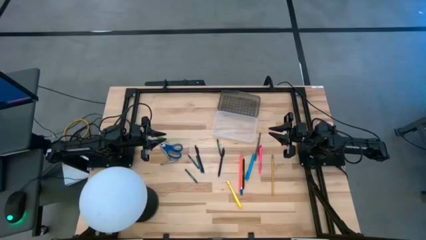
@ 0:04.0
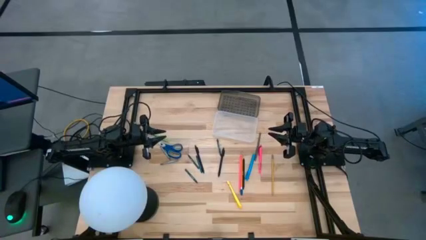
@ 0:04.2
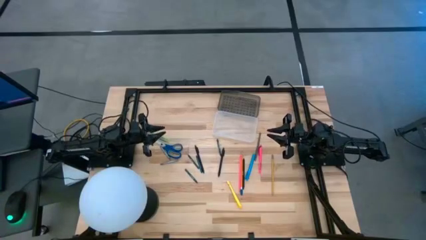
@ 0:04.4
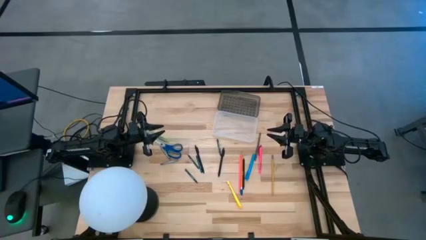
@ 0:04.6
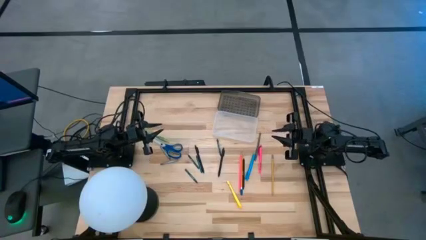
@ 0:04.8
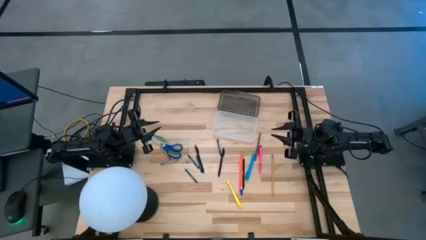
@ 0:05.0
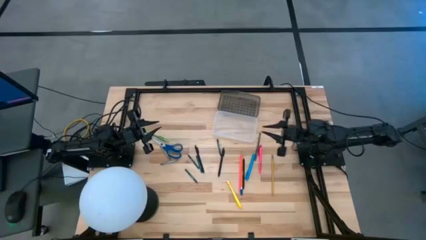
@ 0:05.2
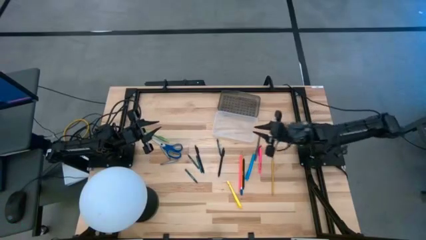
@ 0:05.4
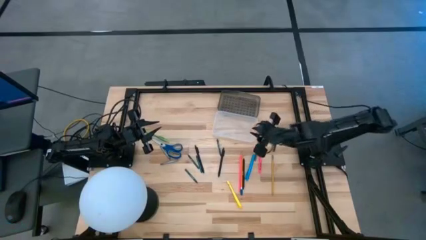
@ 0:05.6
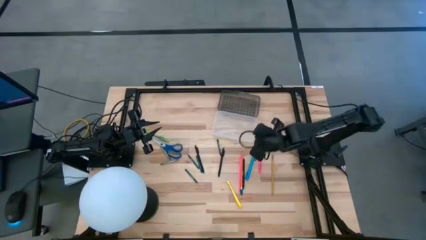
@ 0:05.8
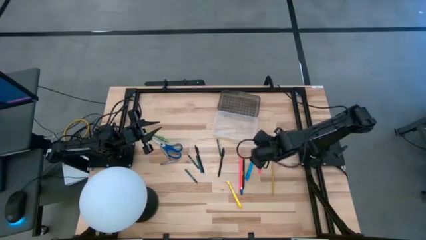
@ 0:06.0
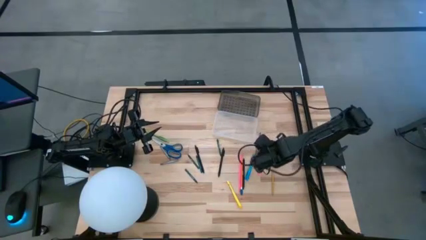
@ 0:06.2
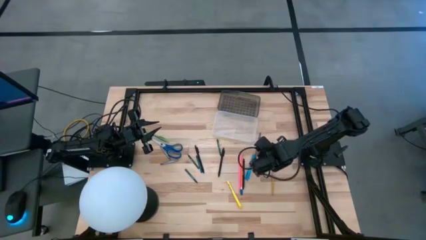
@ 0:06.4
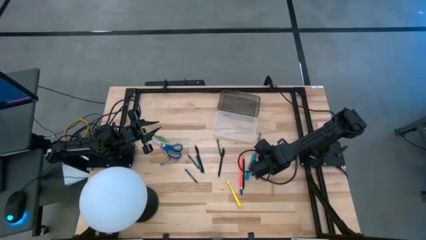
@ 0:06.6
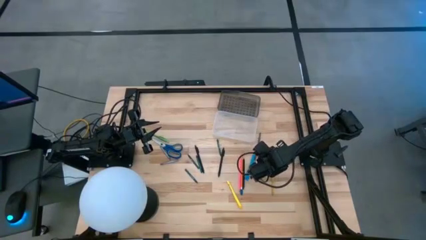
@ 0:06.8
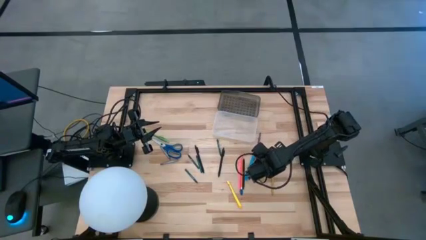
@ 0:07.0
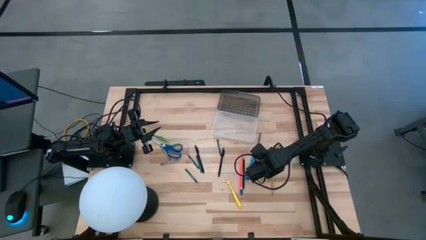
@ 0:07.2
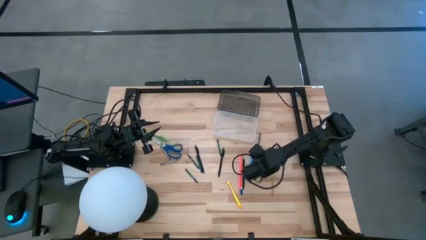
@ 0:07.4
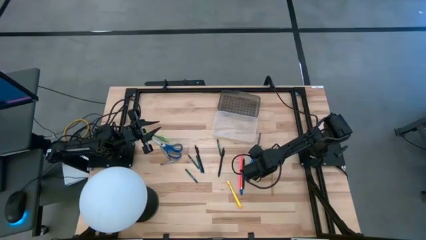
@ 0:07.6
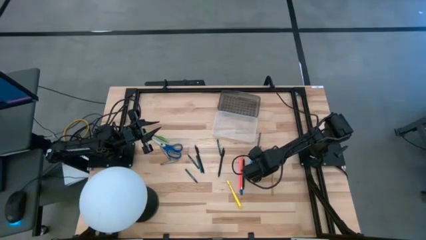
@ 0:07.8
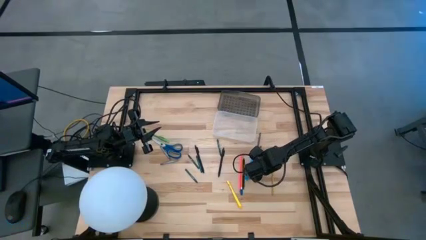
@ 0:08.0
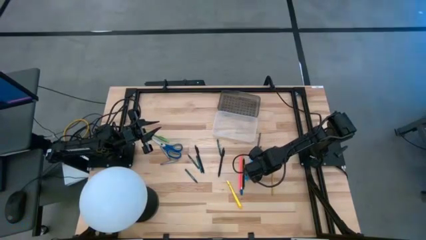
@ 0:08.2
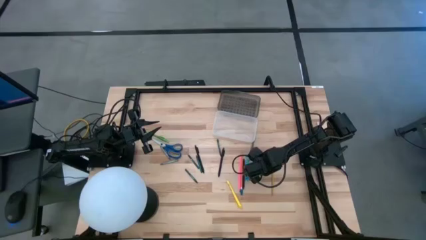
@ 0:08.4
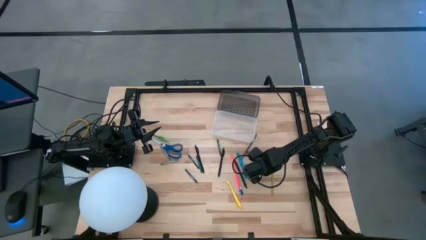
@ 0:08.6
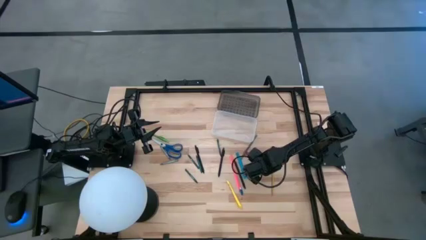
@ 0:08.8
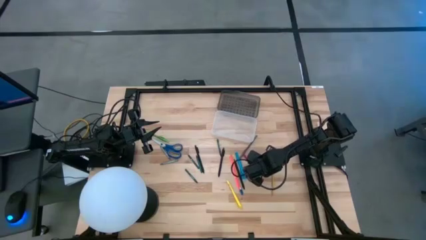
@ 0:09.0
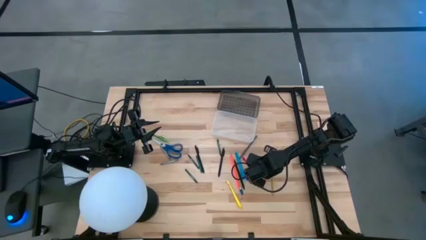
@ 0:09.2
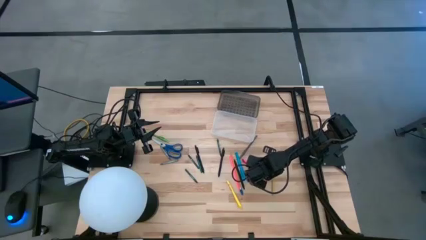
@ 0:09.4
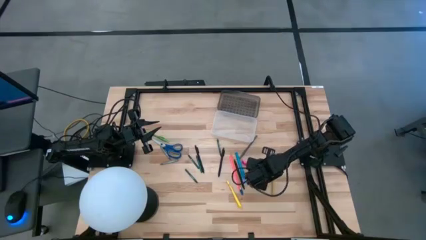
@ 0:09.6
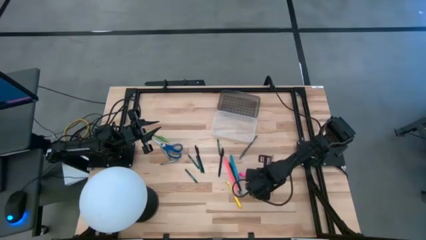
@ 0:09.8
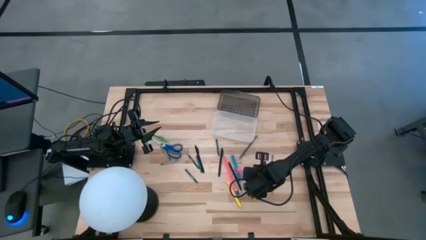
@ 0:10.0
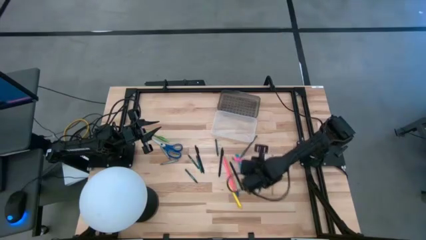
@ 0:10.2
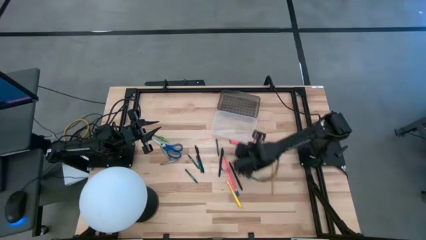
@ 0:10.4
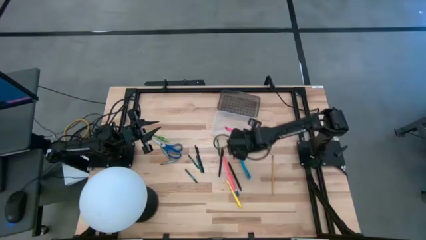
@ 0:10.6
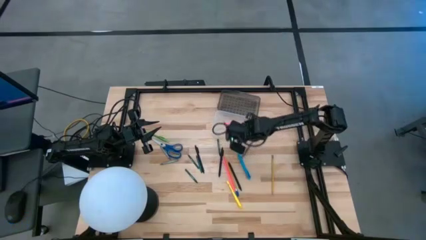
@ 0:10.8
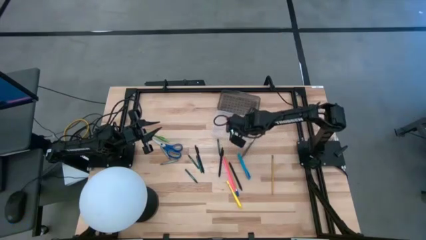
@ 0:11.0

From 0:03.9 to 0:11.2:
Task: Pick & place school supplies into a supply box
Put the pink pen into the black supply box

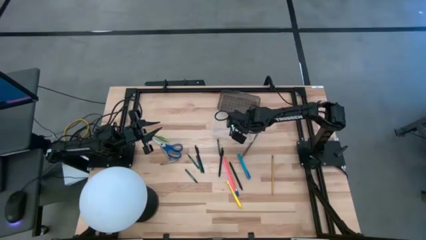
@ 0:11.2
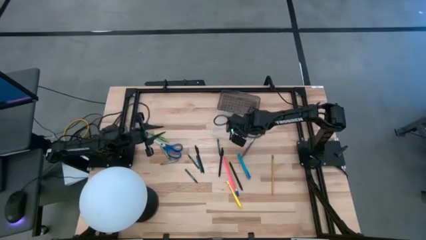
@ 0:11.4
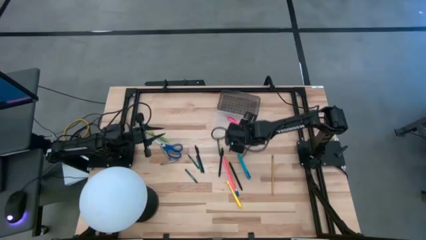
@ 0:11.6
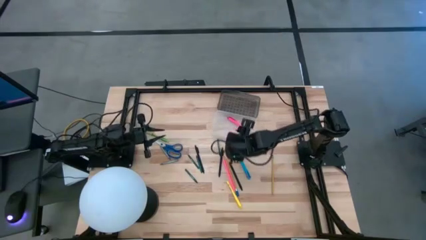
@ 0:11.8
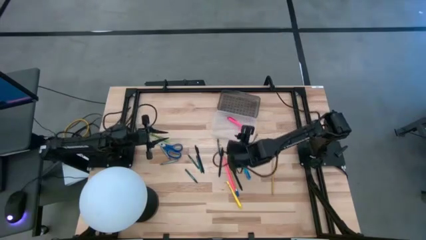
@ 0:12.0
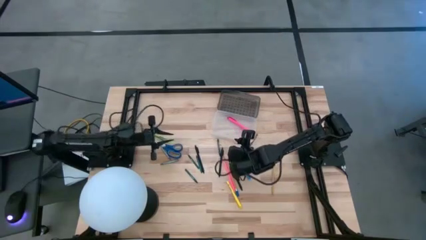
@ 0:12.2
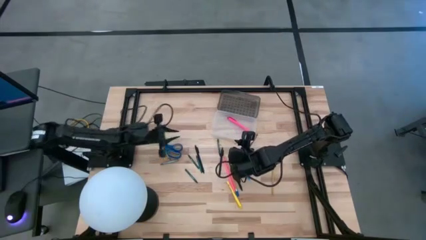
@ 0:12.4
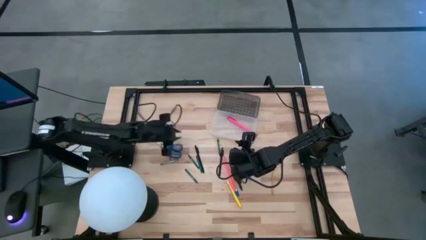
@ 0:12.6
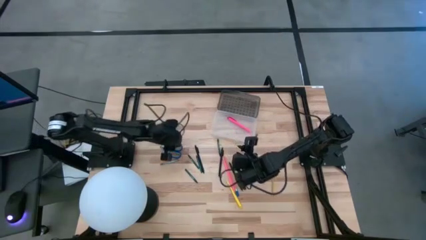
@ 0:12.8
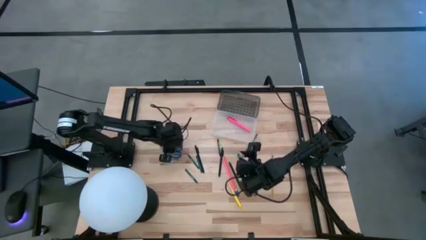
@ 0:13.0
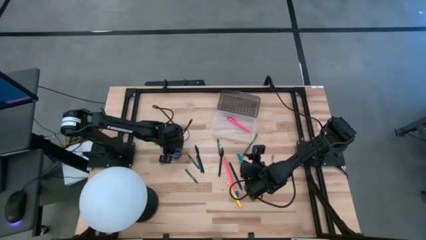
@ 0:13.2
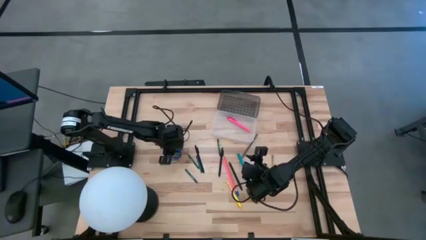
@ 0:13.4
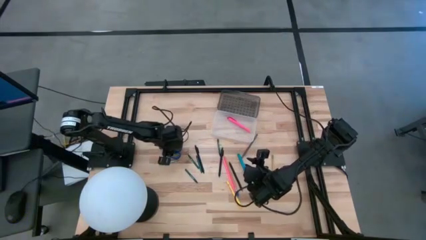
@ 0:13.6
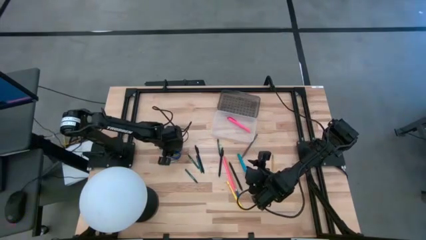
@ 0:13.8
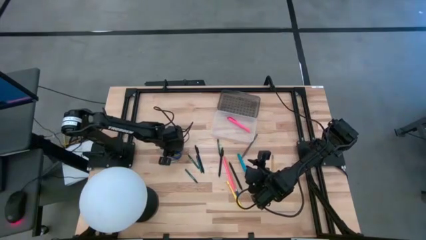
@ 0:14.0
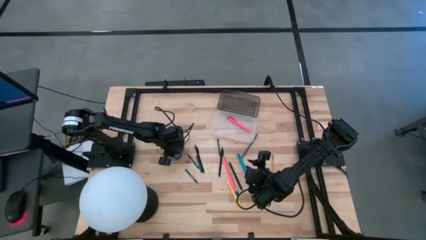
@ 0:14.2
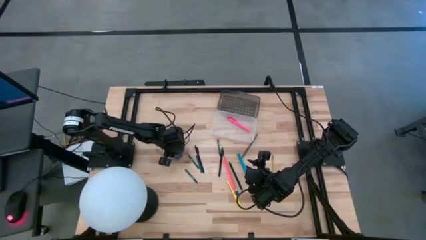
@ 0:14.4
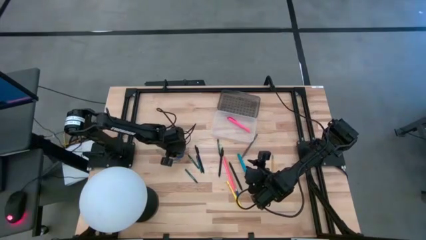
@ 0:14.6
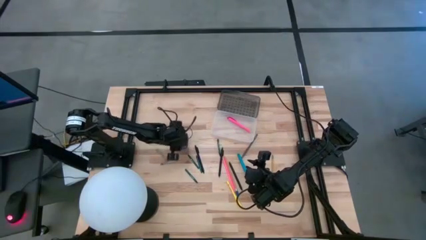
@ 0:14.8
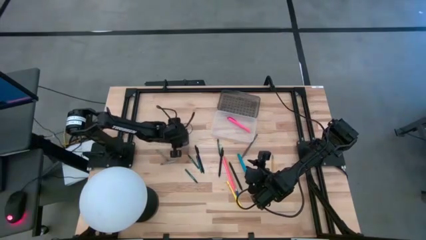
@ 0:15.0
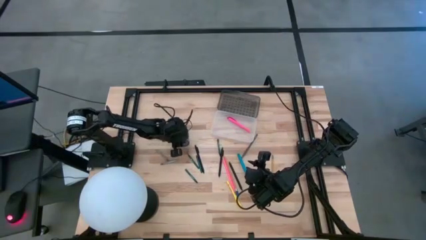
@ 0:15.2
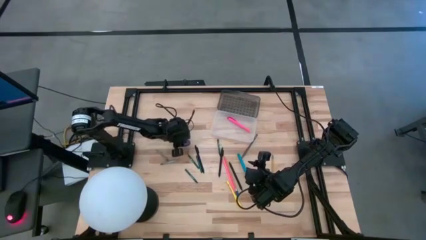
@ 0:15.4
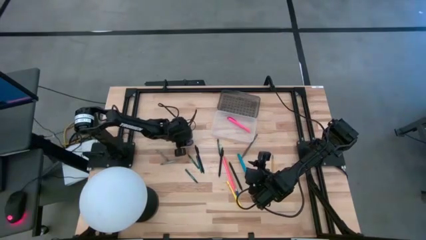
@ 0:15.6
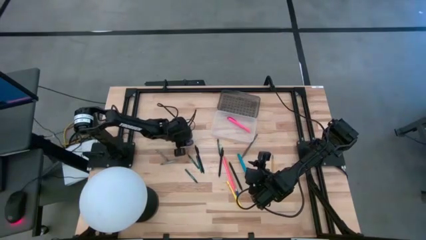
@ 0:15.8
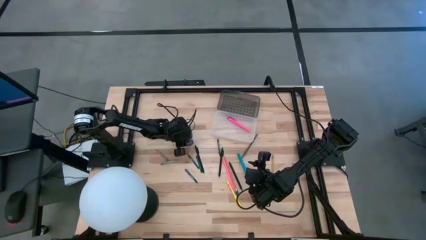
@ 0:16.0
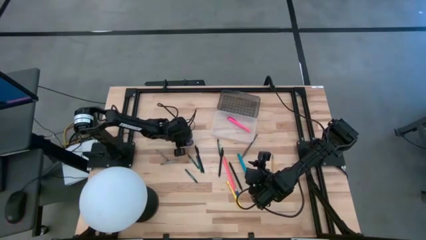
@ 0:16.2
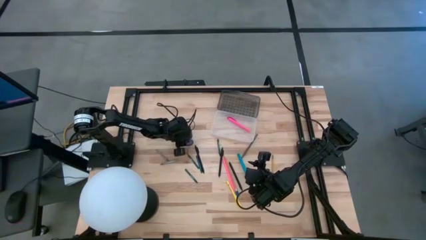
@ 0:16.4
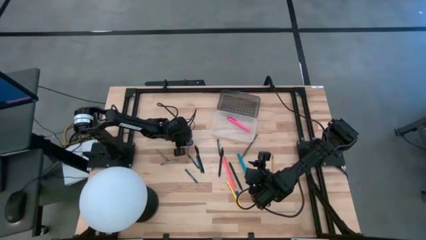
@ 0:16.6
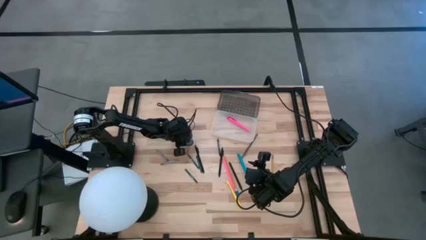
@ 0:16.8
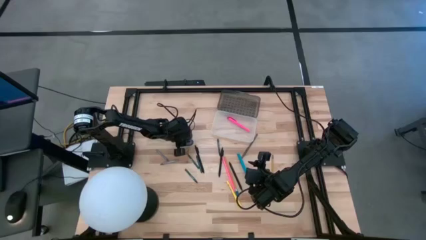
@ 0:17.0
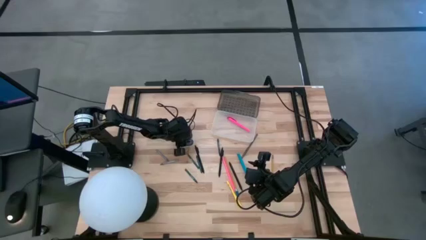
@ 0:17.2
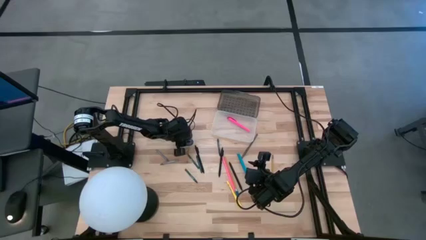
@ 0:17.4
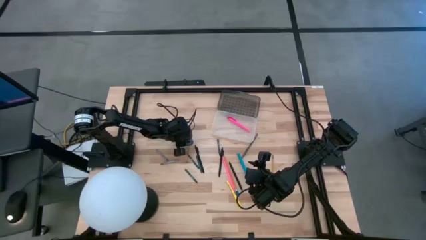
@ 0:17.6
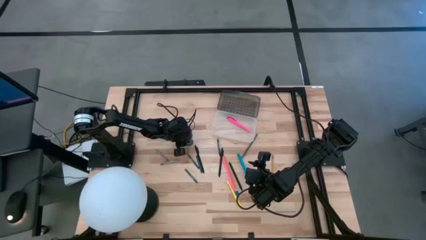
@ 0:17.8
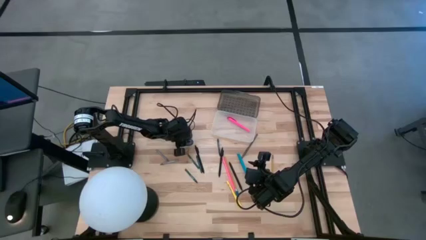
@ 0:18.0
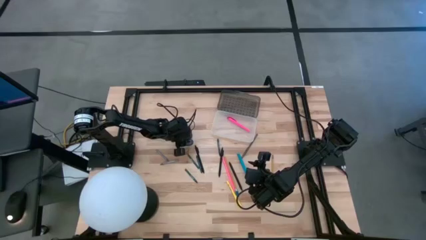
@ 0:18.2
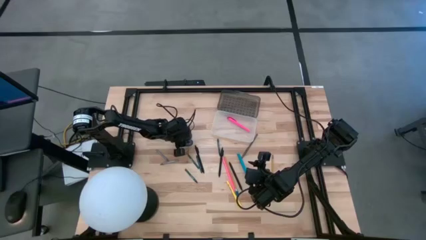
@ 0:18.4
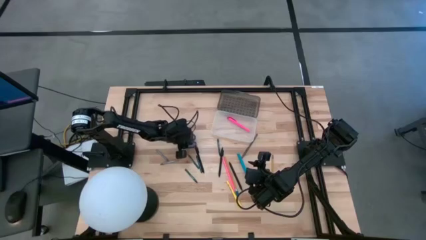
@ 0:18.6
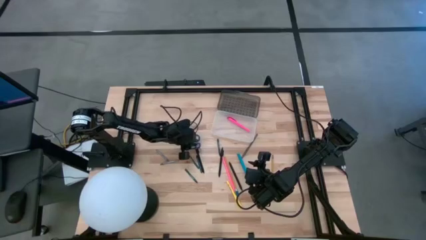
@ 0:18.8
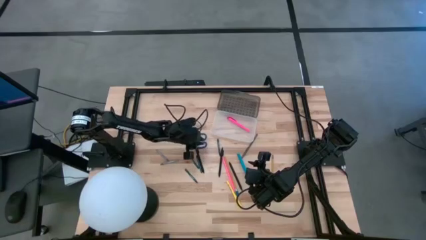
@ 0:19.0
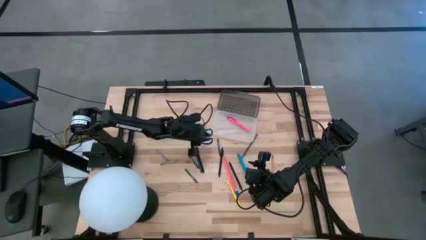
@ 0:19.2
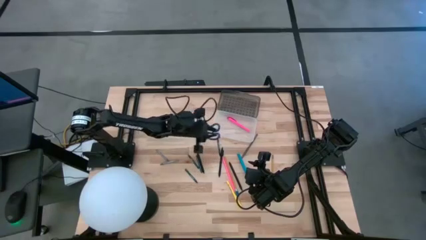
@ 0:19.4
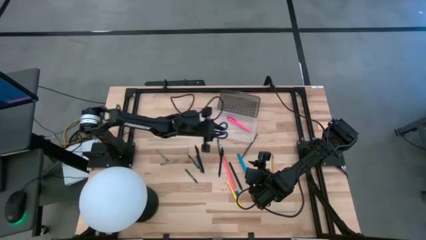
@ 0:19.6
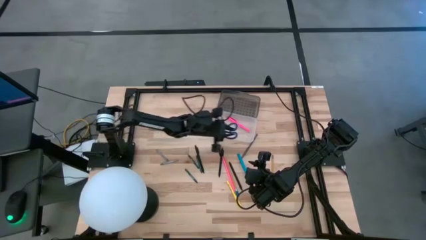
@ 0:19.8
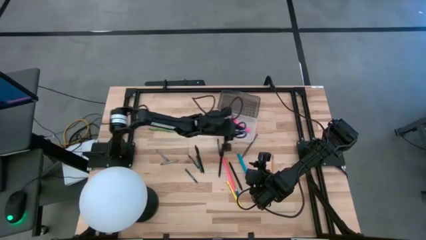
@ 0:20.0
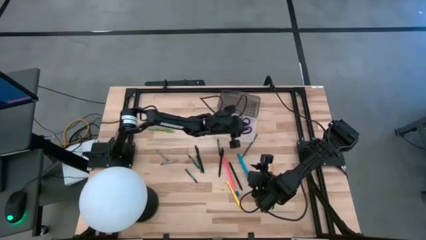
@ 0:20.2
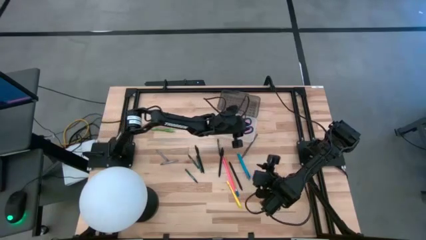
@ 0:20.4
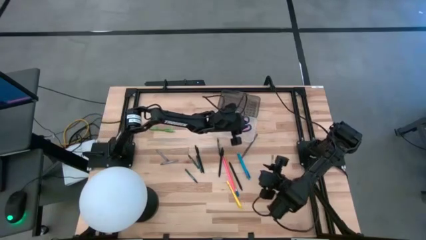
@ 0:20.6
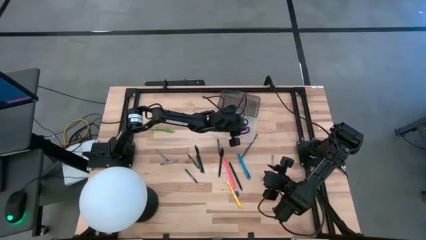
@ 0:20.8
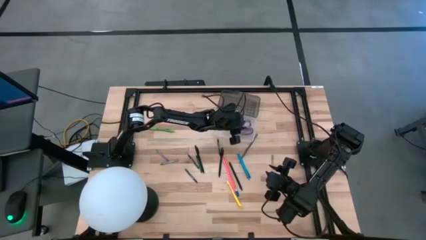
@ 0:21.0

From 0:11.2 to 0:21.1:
Put the blue scissors into the black supply box
